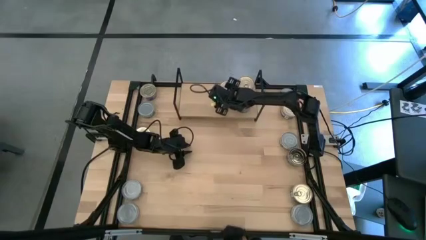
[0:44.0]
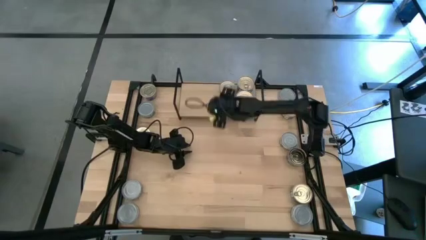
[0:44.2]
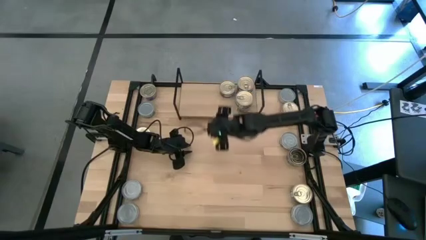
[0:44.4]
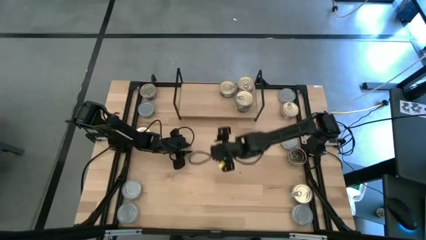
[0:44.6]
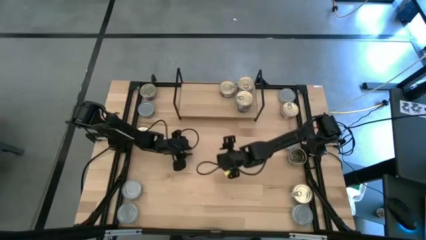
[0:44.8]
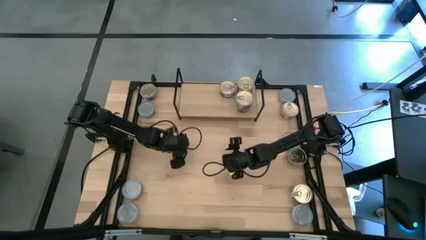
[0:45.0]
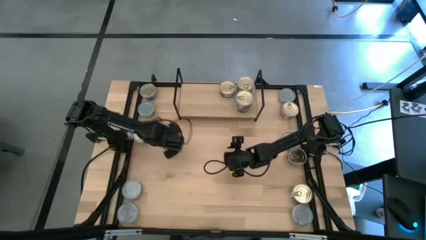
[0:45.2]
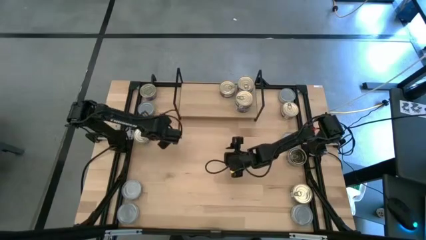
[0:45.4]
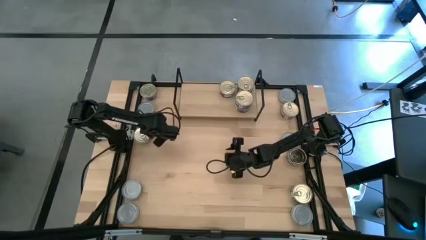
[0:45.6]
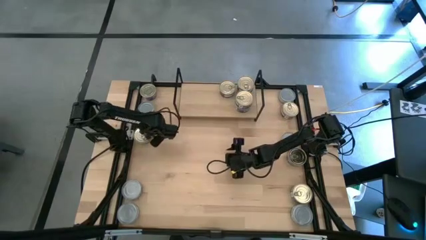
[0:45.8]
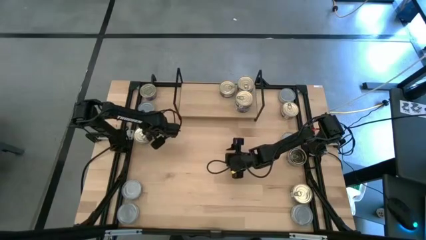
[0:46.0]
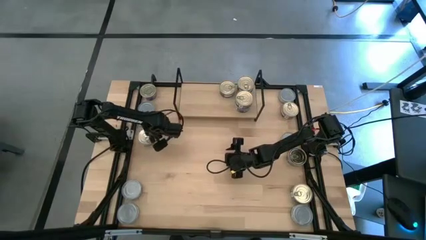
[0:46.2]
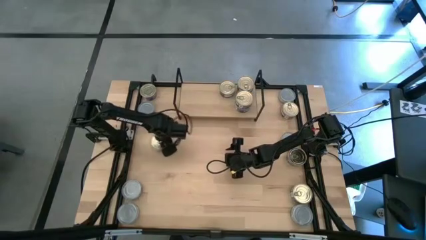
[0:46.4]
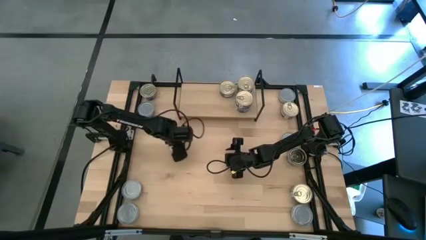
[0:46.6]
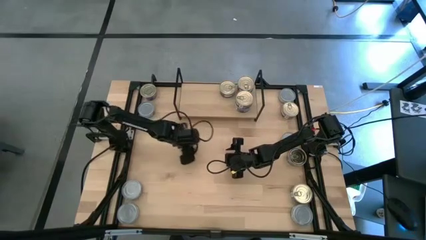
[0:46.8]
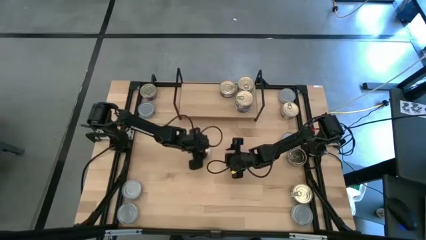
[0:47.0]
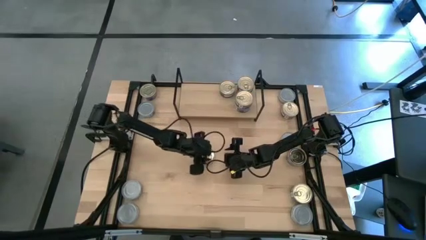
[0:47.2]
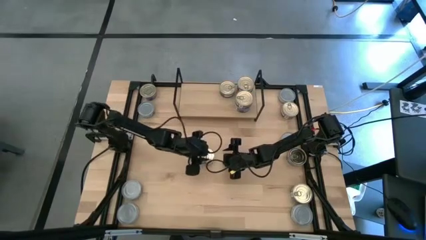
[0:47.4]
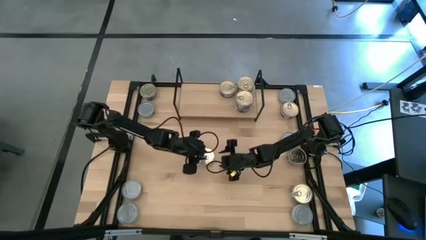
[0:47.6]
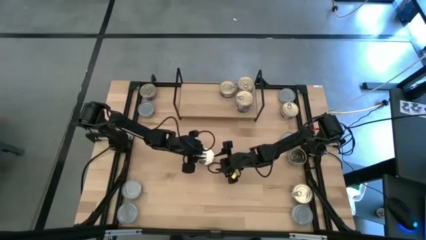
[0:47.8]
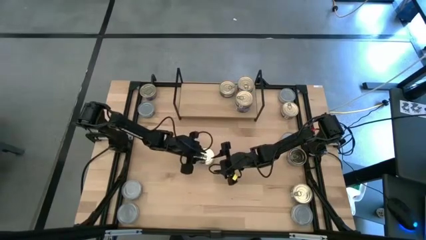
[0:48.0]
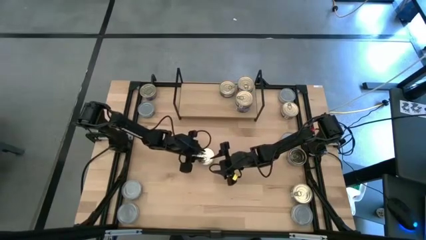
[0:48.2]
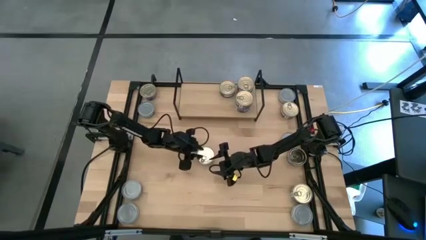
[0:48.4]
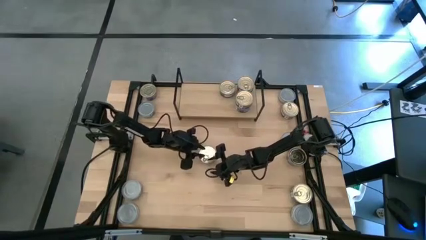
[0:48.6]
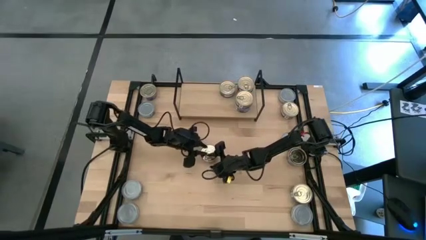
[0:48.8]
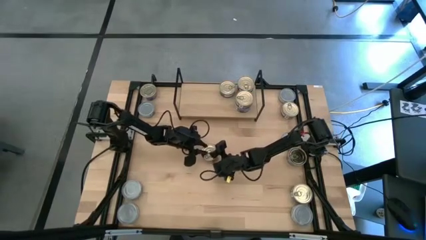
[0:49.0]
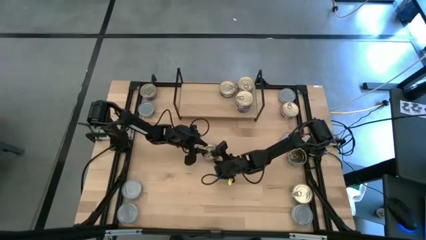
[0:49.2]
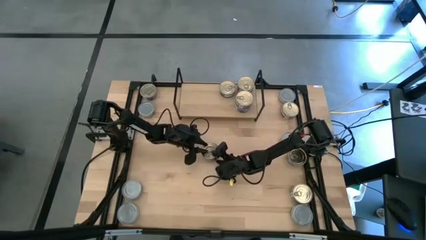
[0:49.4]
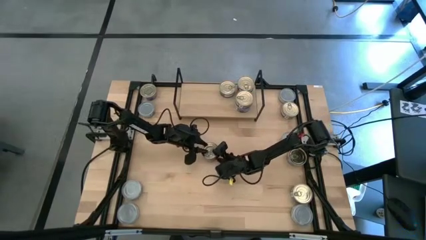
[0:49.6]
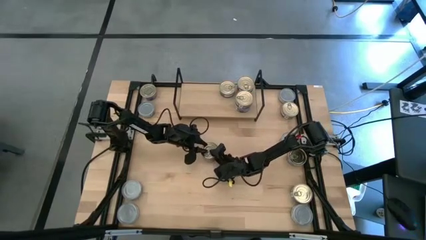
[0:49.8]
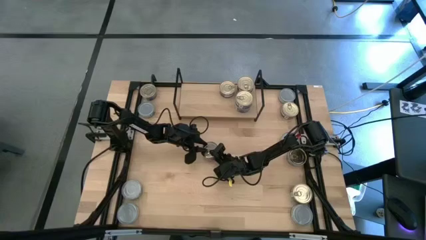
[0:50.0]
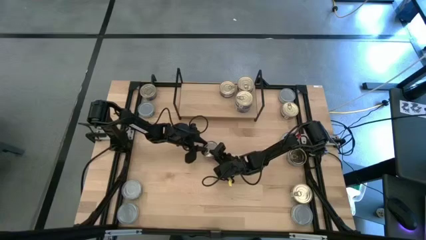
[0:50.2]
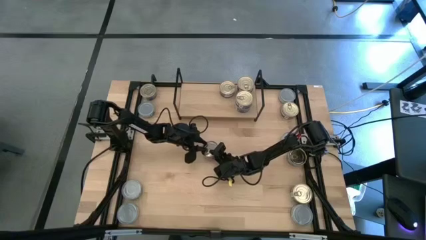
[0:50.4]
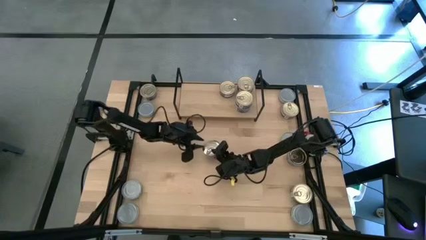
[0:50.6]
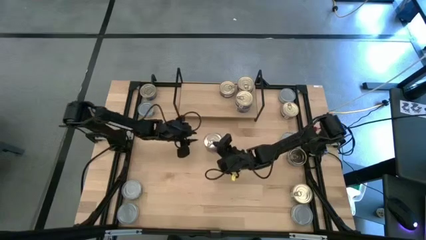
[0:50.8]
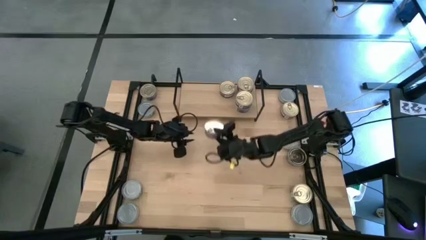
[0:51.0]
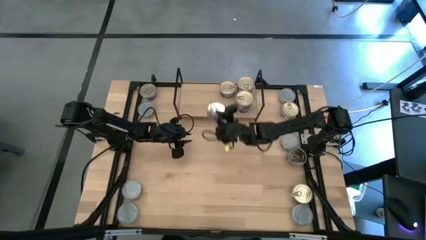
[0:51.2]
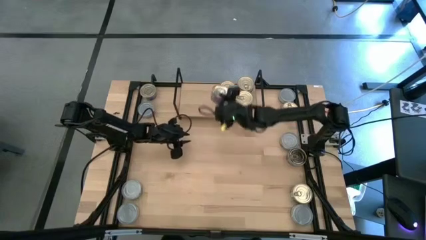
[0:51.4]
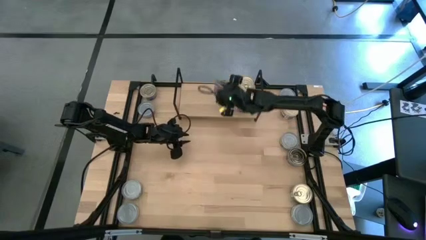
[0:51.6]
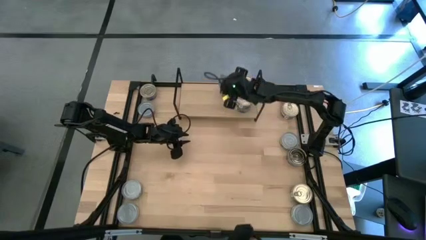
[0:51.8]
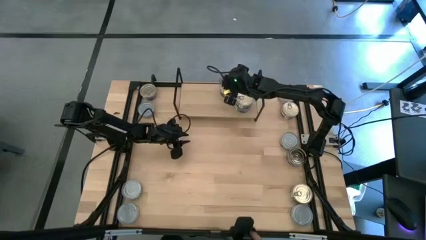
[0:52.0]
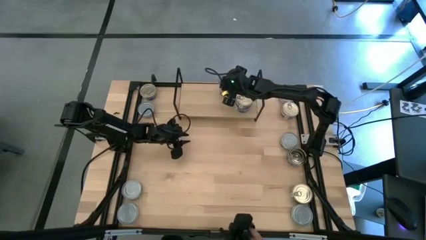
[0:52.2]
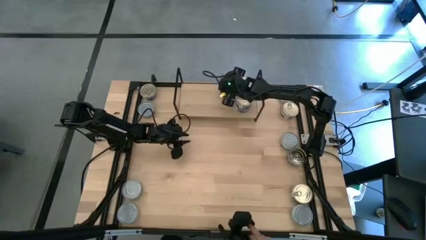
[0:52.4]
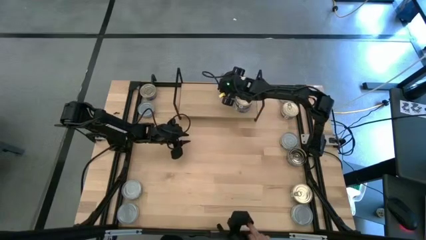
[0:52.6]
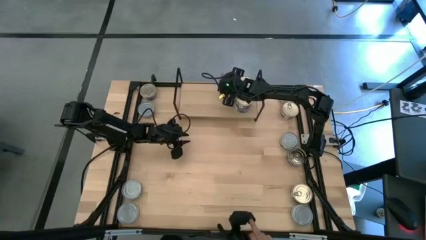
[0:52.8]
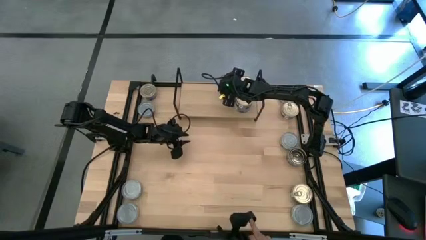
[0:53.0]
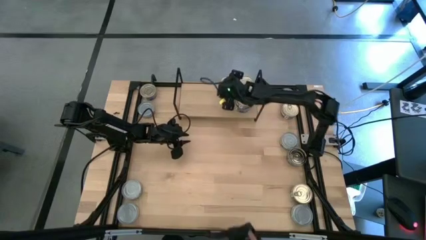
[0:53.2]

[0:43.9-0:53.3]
Task: Stack canned seafood by type on shelf
Stack the blue and pink tuna can on top of the blue and pink tuna can on the shelf

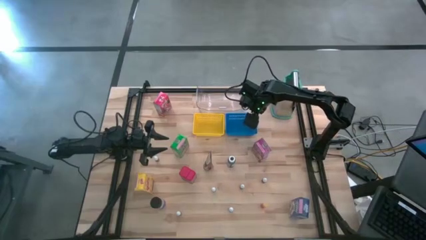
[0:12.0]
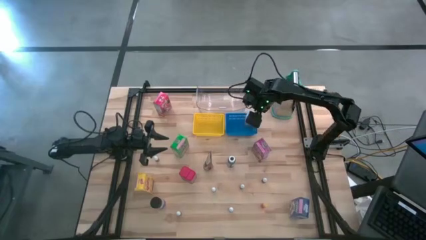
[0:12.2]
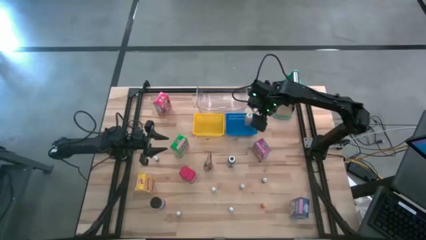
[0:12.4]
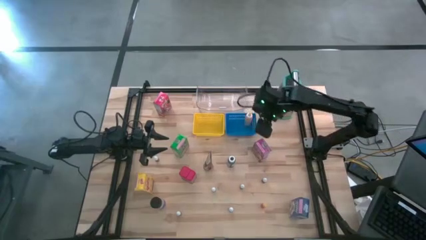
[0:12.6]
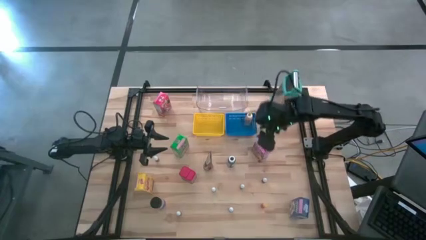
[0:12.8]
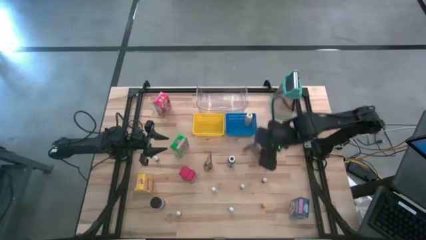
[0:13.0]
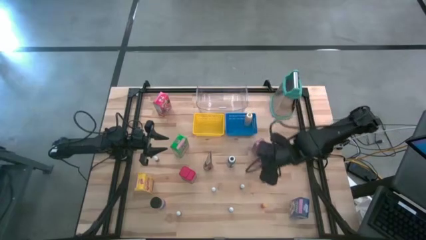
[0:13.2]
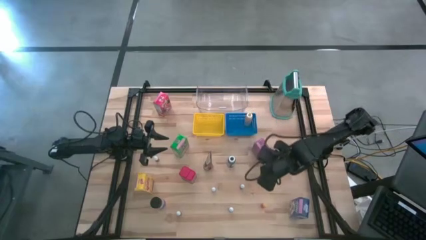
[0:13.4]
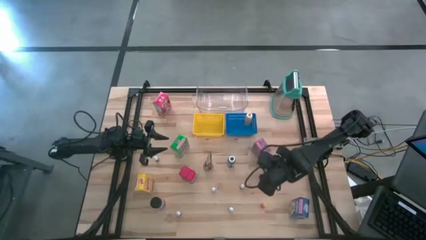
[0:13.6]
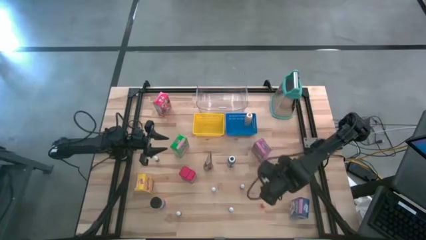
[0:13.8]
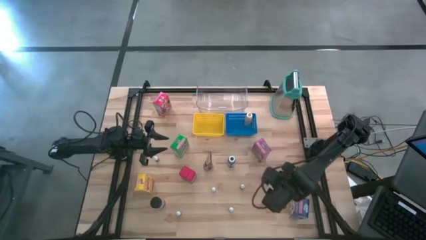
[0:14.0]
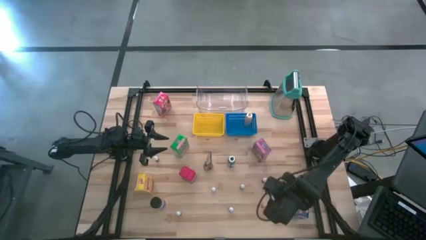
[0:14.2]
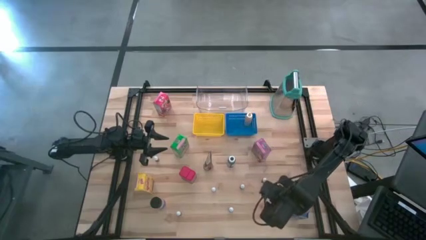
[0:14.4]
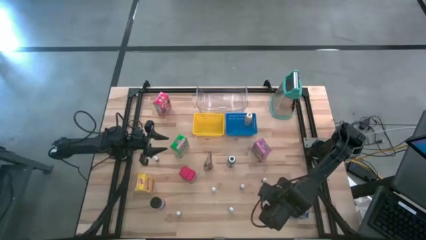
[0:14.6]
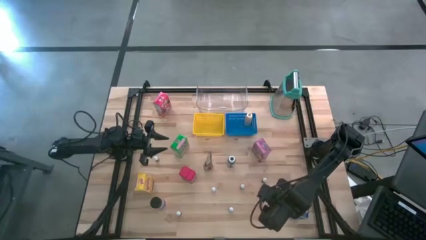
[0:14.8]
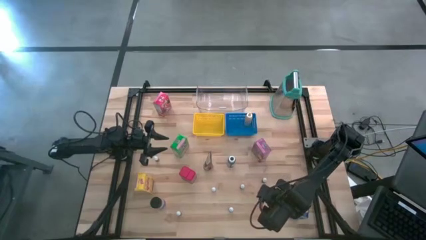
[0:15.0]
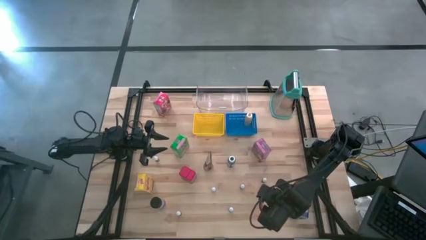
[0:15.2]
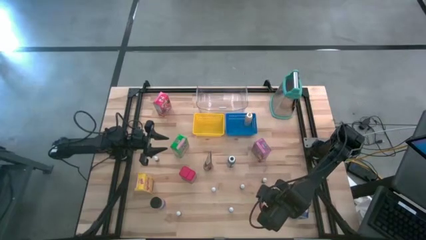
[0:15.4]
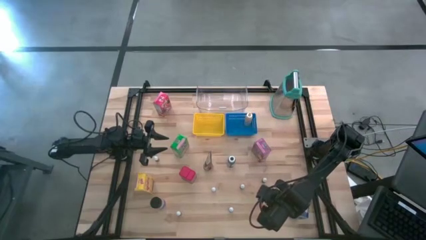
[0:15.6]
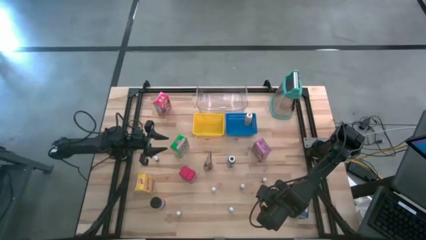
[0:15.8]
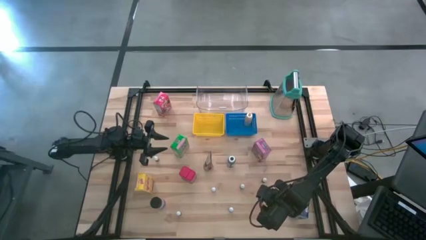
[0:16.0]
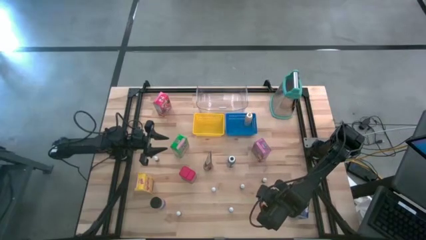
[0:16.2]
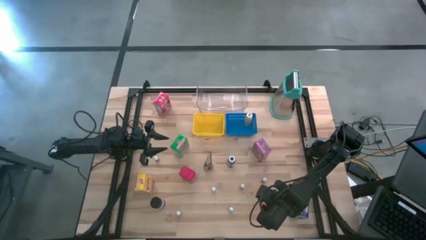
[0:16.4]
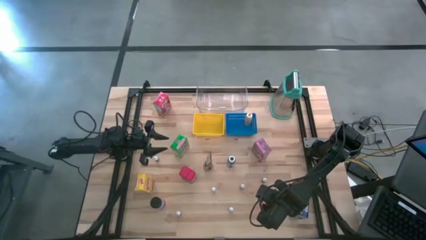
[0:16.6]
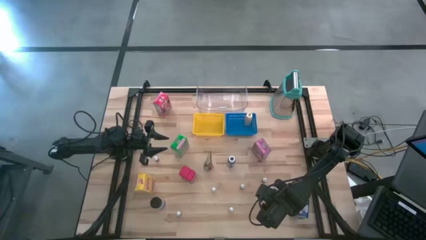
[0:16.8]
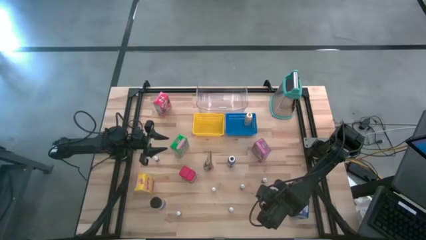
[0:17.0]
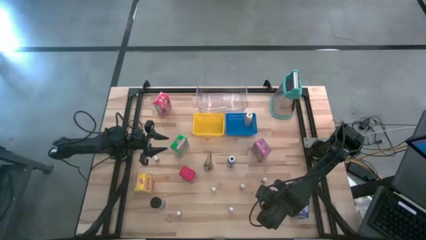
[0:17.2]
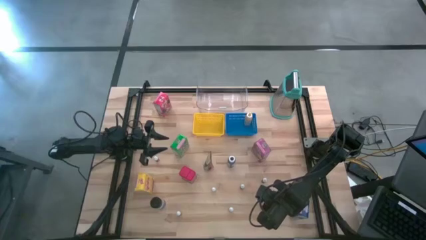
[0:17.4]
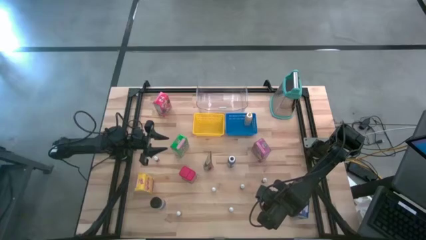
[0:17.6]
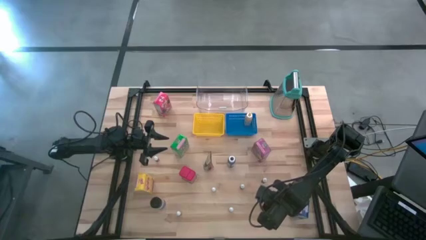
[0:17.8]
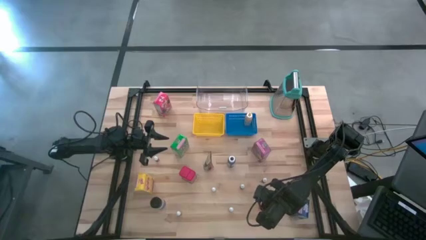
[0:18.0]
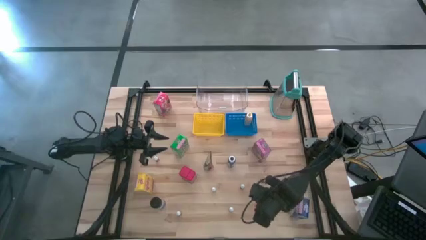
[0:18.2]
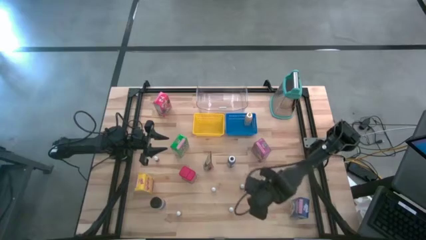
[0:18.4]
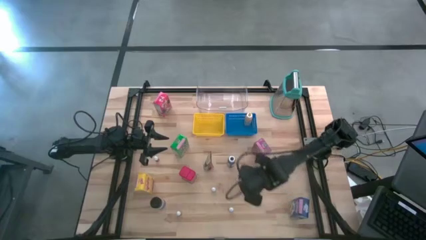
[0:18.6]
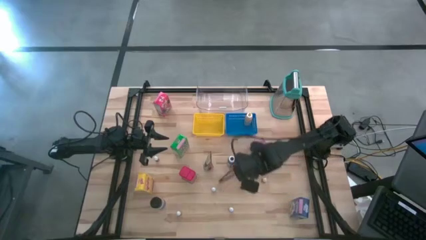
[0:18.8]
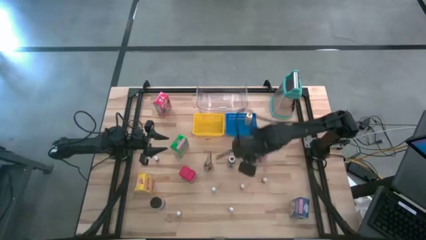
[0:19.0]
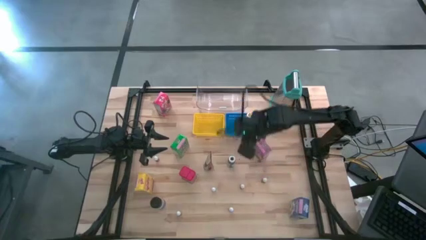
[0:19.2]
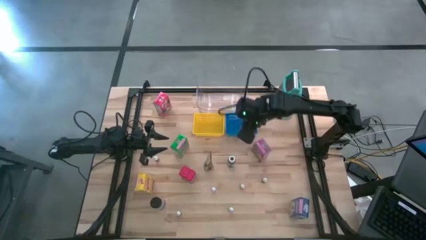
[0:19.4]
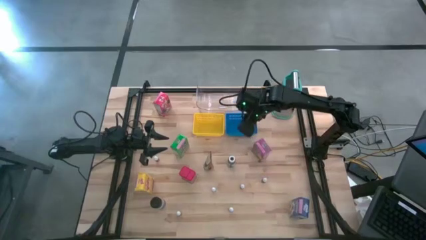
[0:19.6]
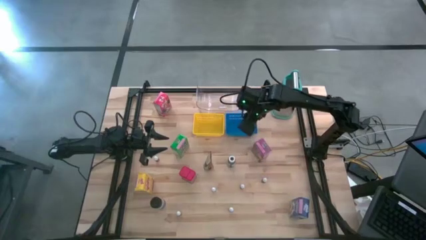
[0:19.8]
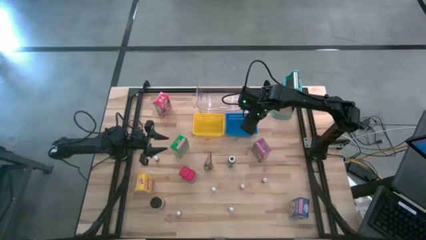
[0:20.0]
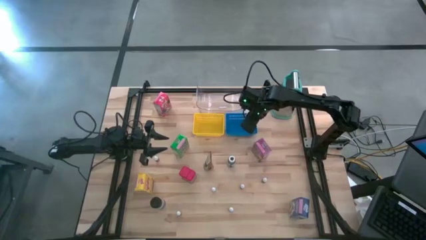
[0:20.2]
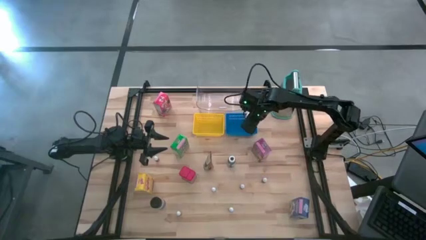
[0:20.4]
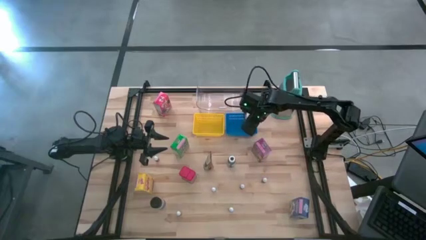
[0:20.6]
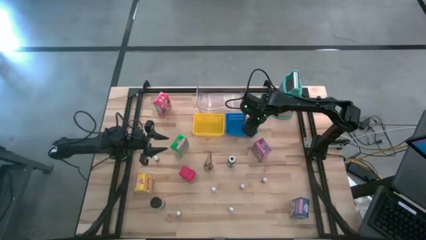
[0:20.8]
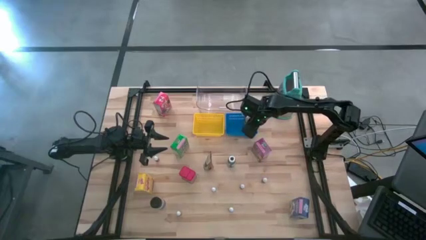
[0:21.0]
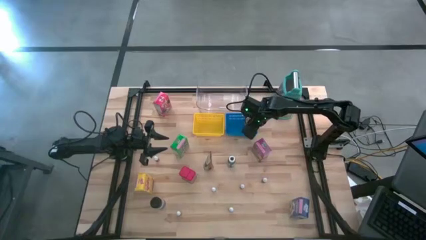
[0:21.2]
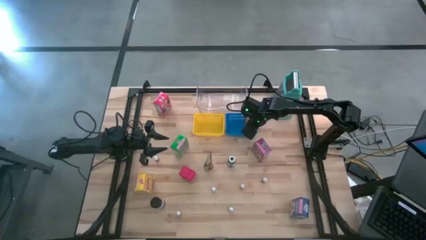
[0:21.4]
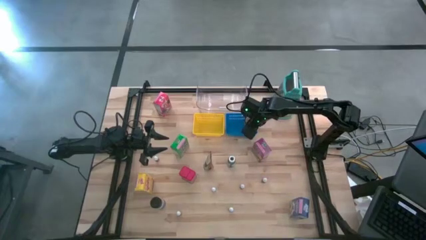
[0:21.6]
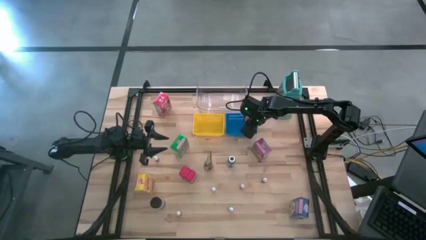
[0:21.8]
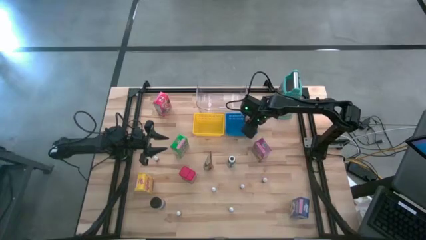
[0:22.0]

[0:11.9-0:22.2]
Task: Pick & Place Kitchen Items
Put the right red food coloring bottle into the blue bin
